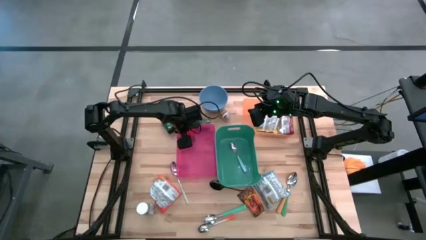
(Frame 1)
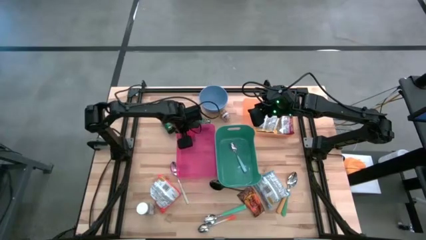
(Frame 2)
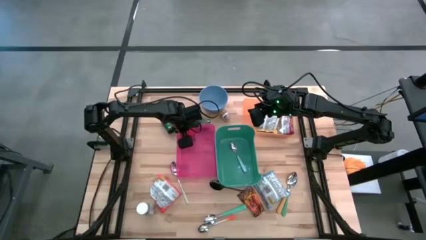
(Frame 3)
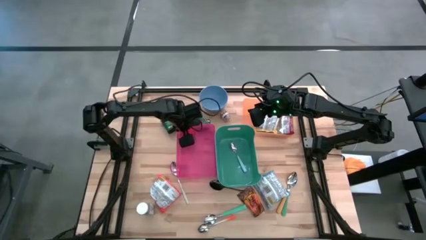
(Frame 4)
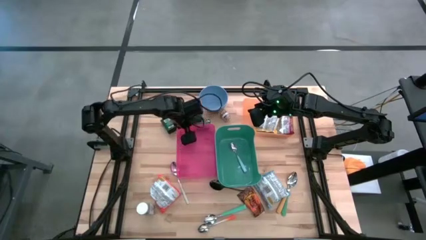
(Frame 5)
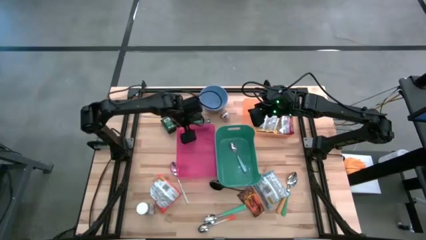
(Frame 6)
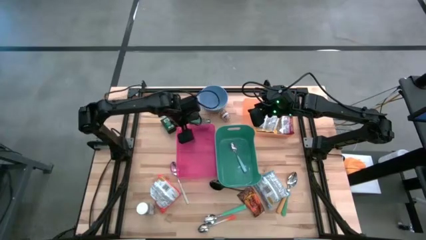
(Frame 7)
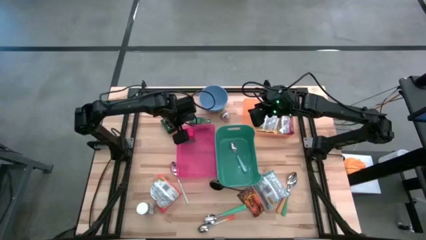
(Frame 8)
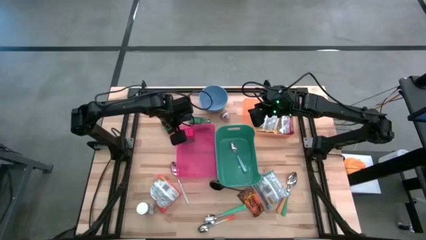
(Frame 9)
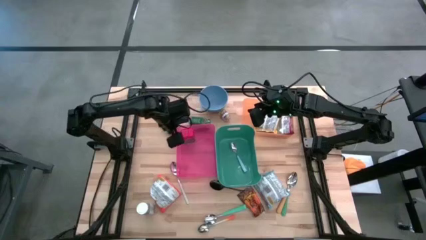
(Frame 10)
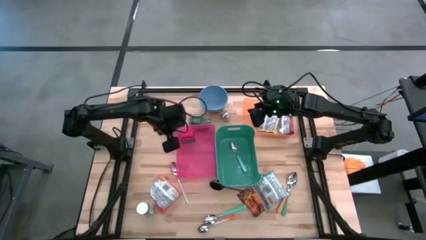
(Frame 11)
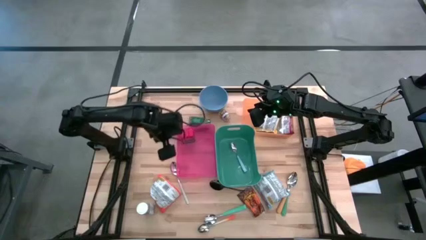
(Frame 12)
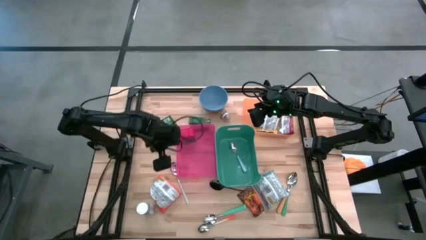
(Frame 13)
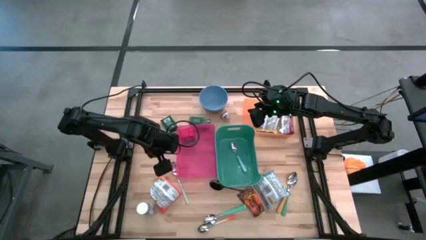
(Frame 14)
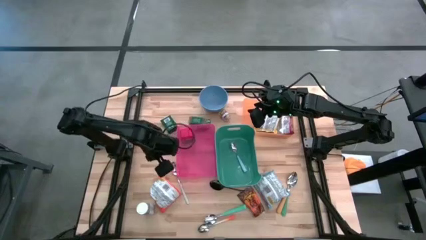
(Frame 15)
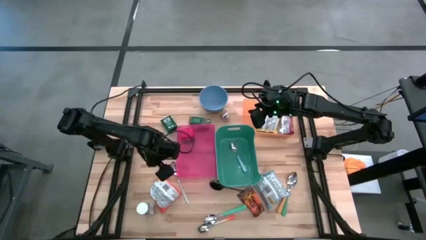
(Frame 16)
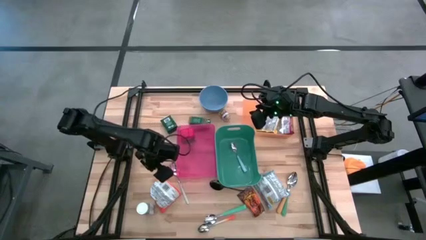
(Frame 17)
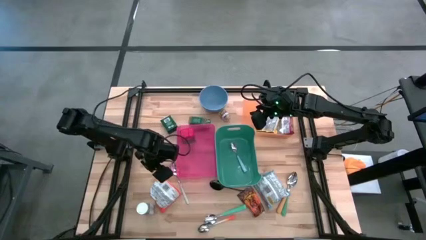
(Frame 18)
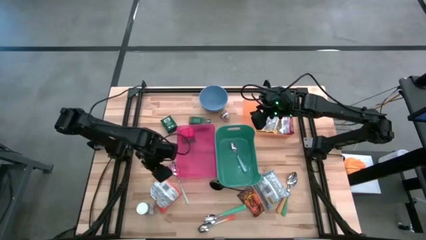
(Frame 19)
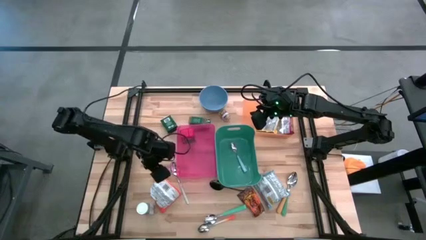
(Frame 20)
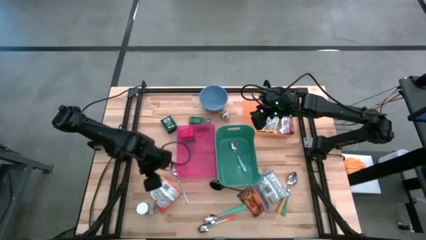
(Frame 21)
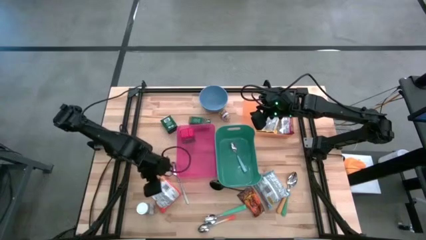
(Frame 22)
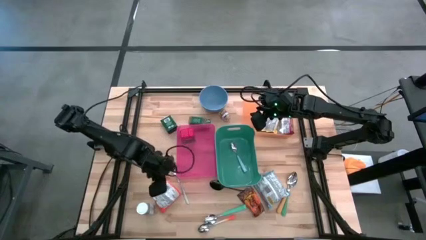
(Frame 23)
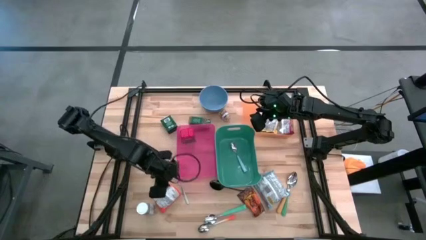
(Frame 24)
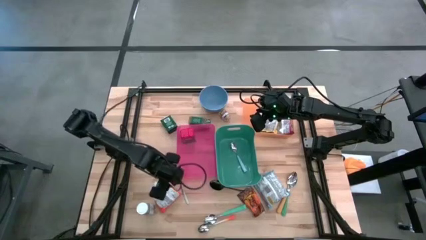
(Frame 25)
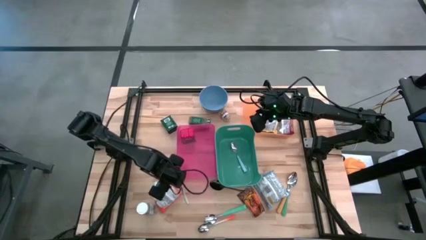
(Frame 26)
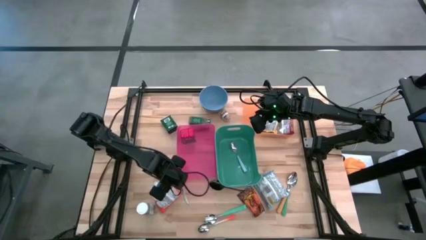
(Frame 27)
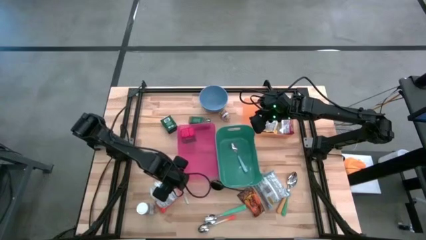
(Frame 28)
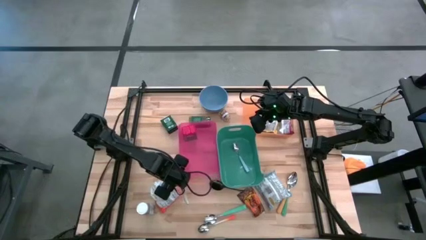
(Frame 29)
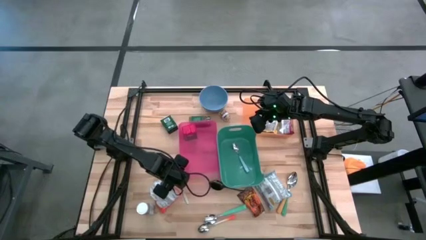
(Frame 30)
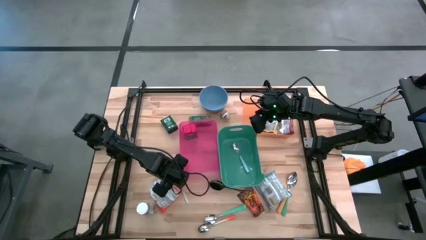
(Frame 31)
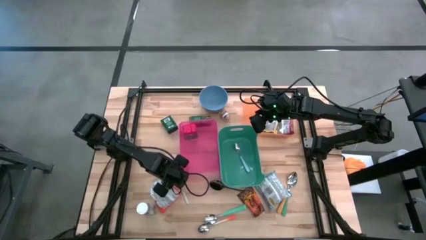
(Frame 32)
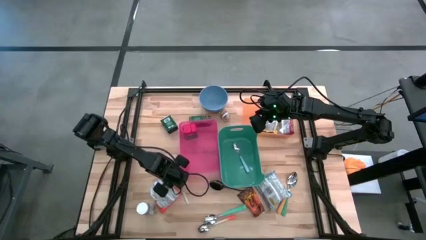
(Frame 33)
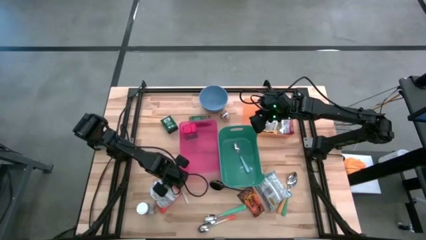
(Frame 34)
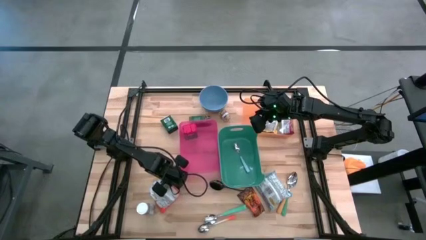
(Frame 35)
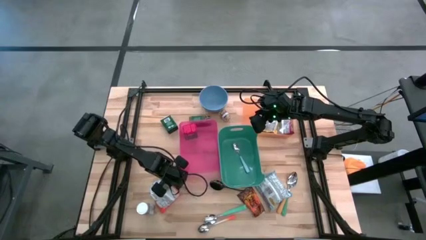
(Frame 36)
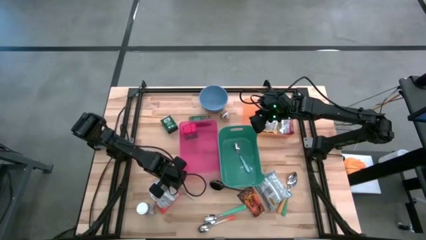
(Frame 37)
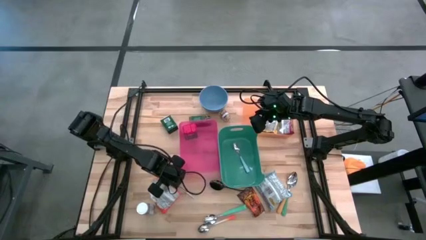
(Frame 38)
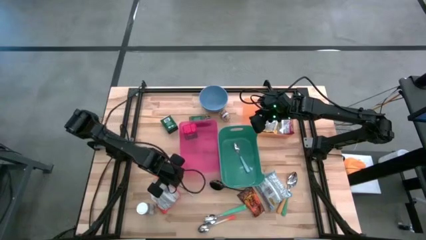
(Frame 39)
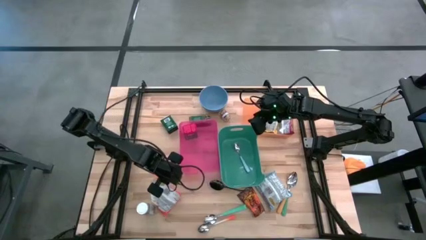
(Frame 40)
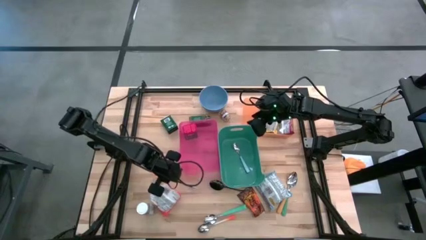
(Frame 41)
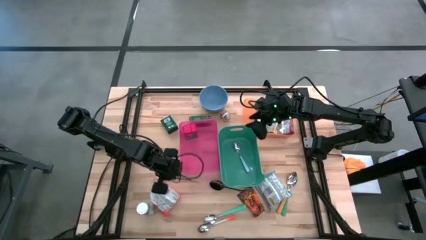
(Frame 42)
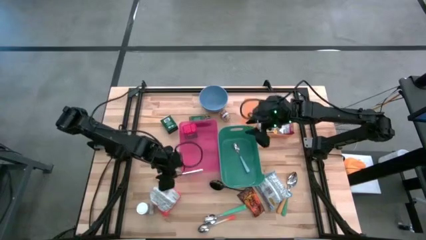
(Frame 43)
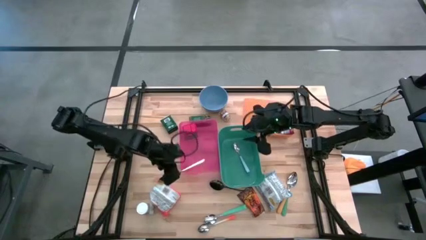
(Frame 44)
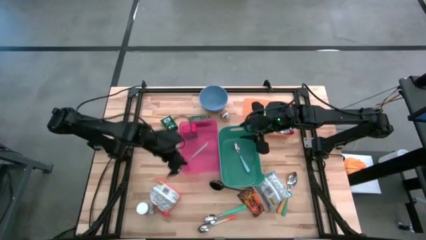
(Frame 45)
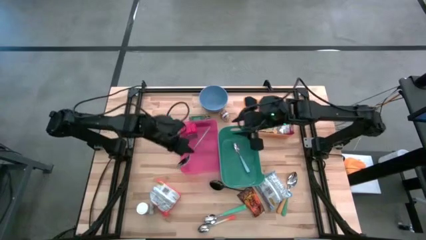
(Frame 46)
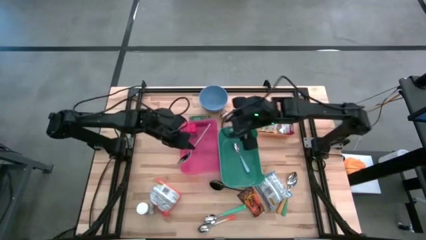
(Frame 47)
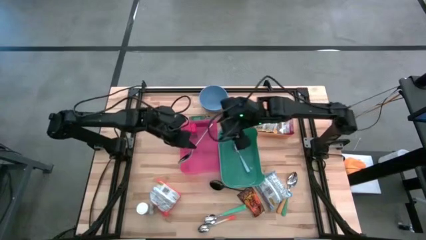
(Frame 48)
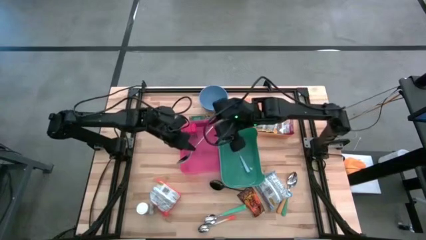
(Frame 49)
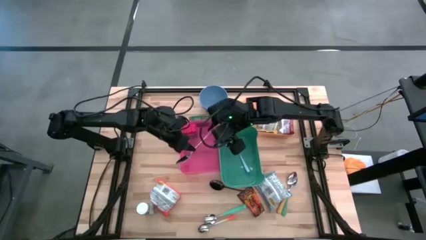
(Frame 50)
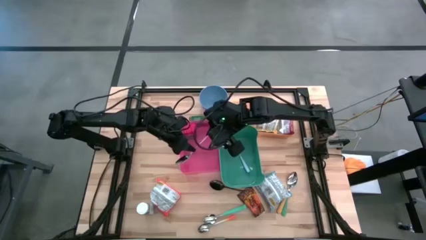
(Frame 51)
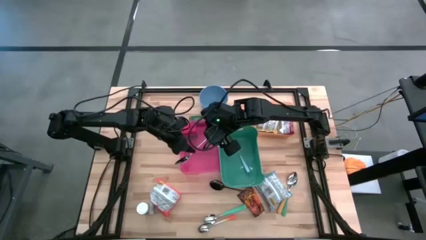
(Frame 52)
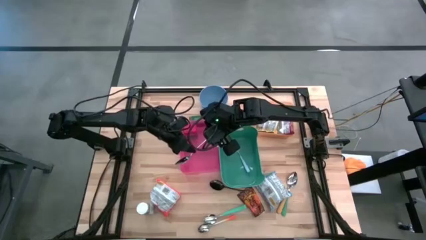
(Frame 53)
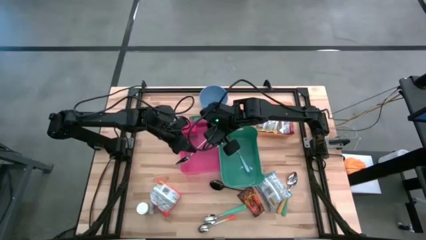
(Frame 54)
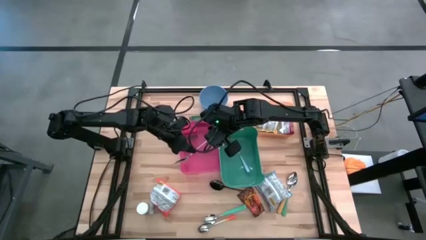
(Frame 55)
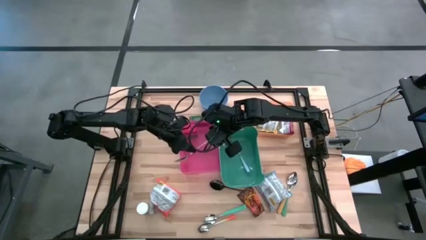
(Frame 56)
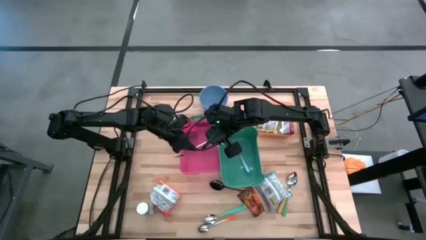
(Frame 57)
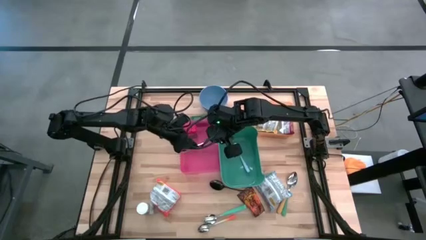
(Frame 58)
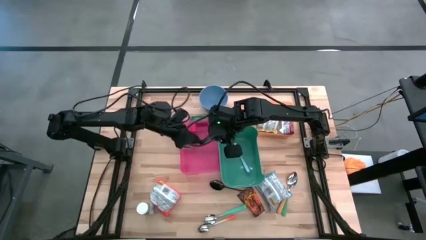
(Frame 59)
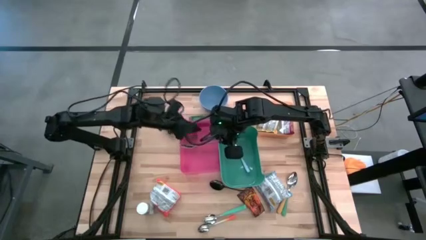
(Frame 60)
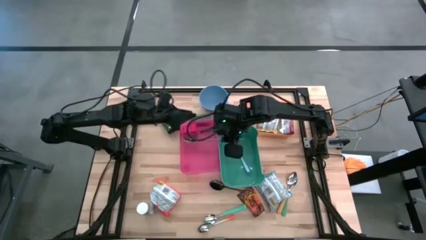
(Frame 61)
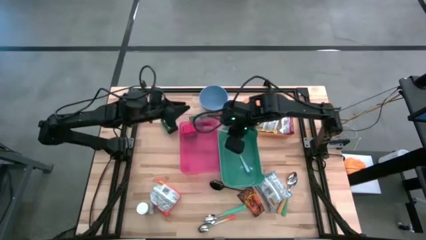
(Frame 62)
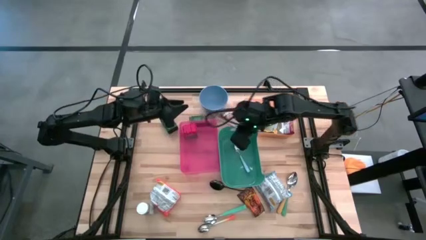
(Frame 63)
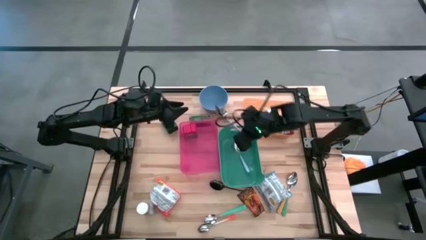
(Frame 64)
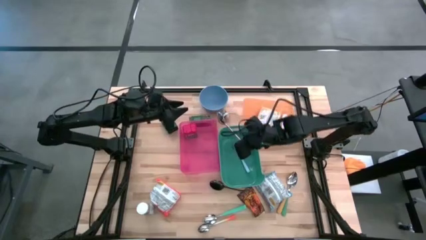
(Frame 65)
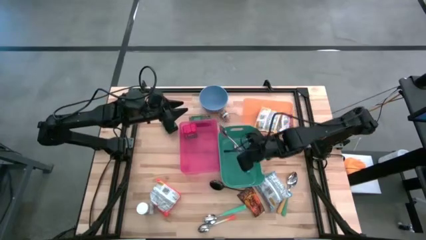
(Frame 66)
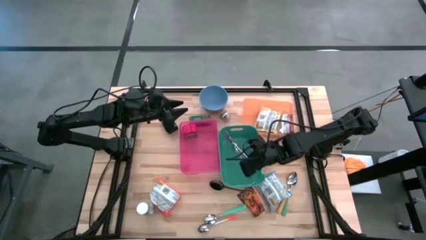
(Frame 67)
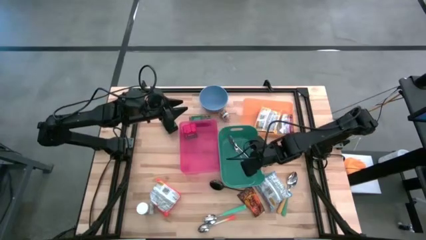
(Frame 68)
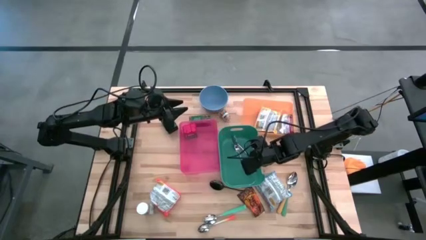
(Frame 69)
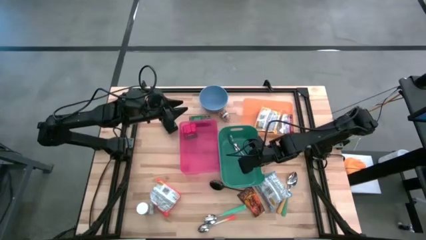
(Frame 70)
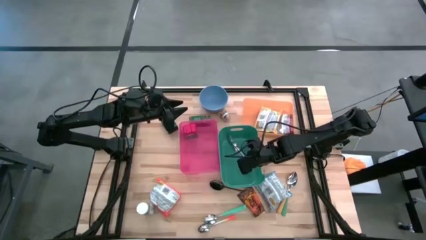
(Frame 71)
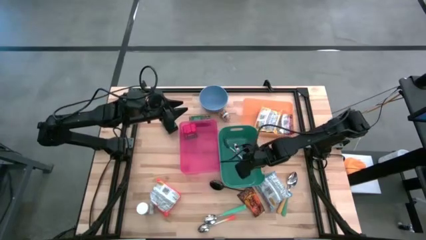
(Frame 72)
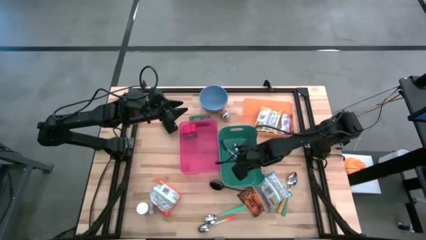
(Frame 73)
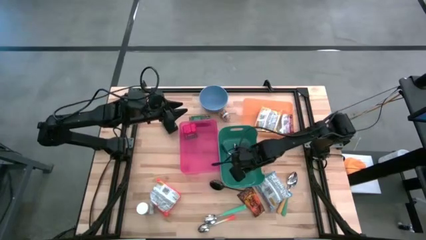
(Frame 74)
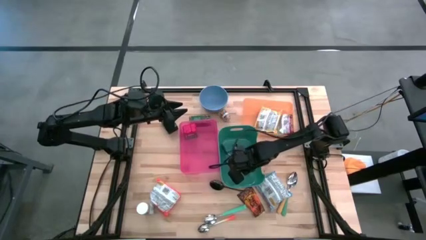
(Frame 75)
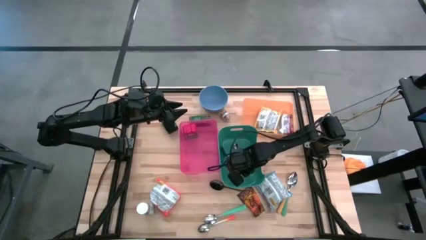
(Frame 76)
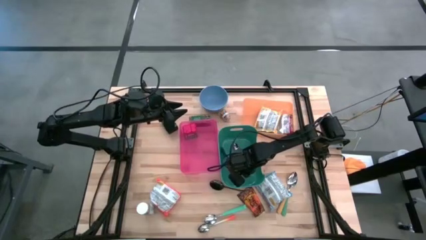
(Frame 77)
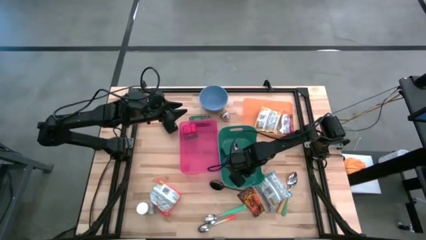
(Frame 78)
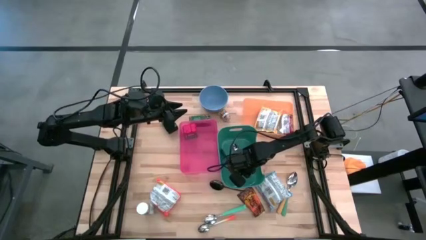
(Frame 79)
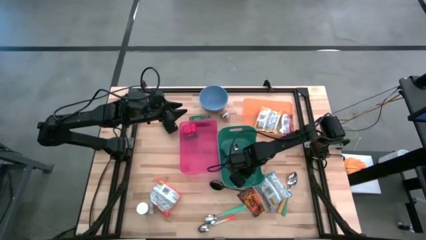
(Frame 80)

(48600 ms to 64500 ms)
Put the silver spoon into the green bin
